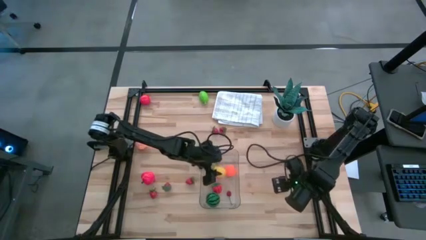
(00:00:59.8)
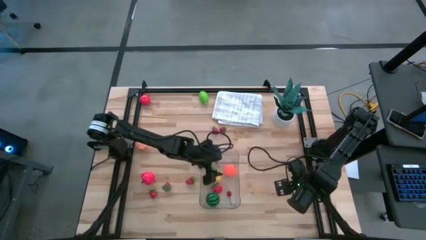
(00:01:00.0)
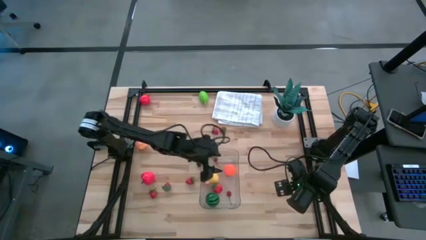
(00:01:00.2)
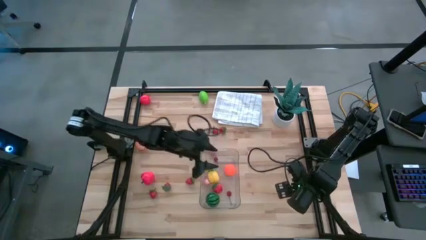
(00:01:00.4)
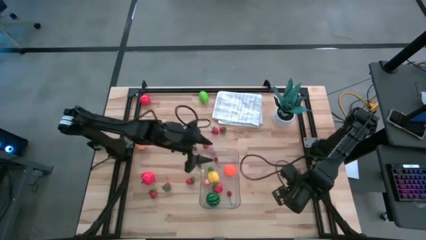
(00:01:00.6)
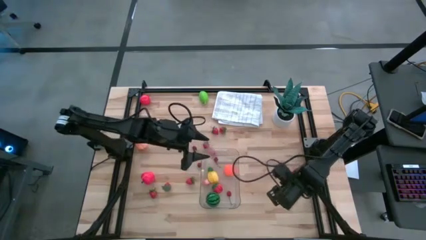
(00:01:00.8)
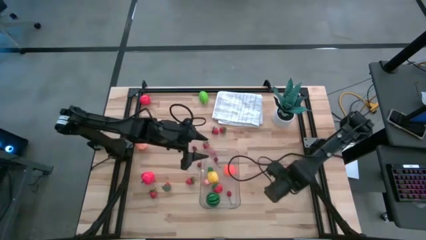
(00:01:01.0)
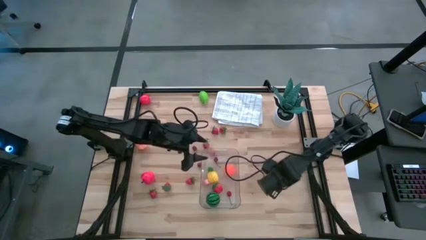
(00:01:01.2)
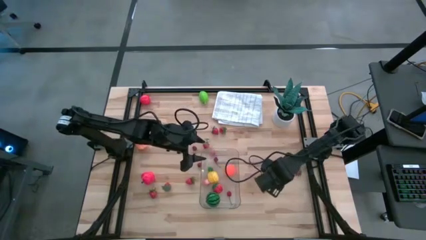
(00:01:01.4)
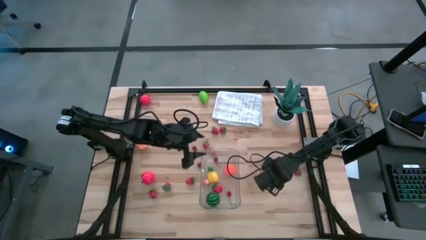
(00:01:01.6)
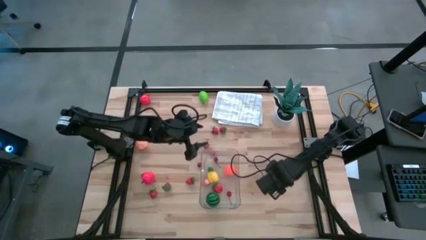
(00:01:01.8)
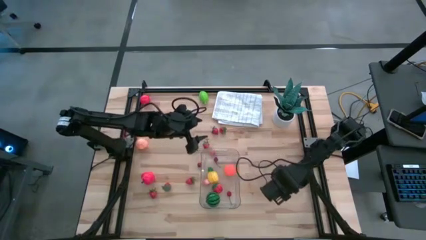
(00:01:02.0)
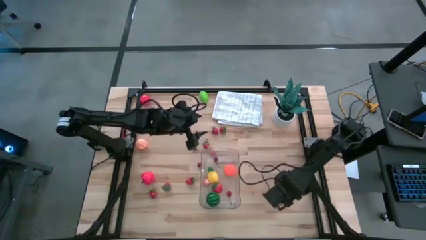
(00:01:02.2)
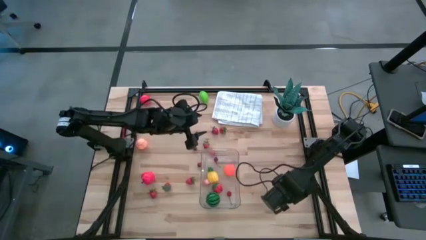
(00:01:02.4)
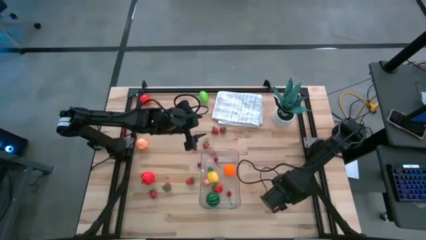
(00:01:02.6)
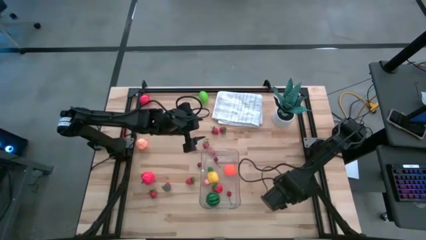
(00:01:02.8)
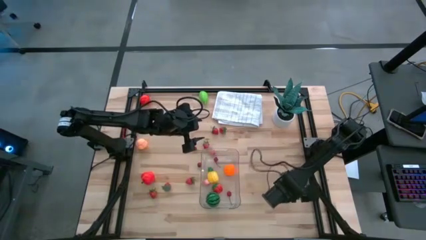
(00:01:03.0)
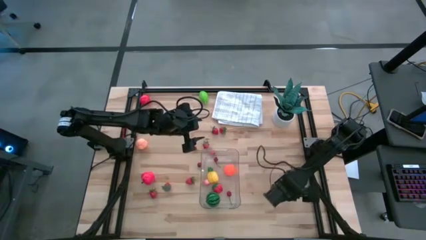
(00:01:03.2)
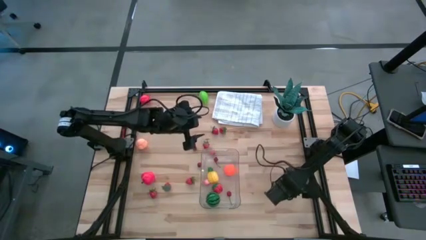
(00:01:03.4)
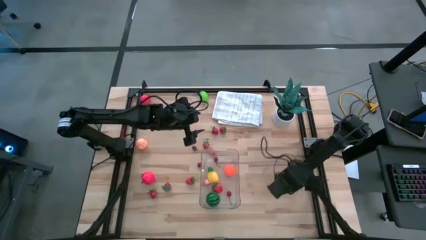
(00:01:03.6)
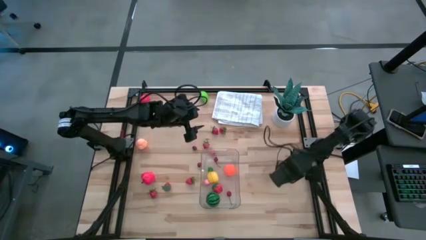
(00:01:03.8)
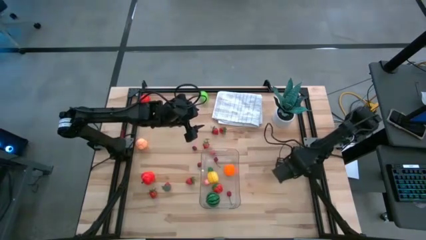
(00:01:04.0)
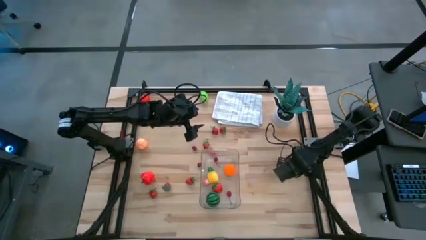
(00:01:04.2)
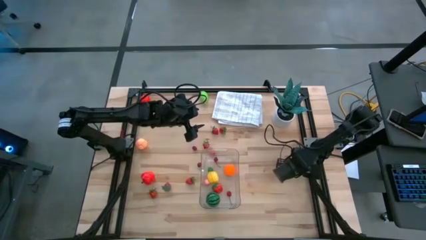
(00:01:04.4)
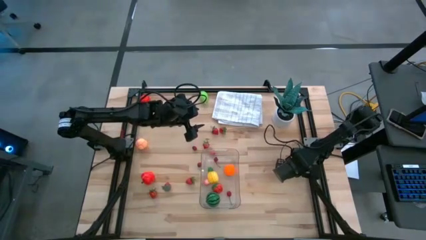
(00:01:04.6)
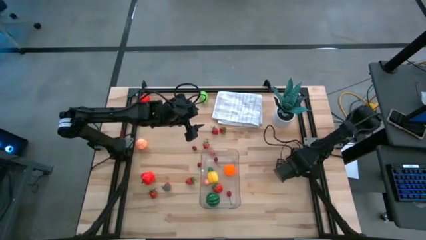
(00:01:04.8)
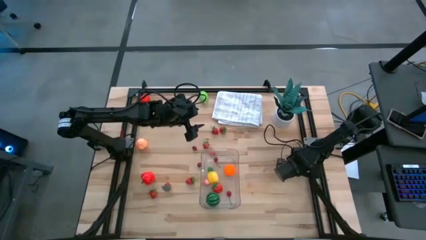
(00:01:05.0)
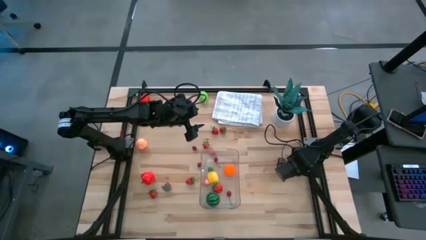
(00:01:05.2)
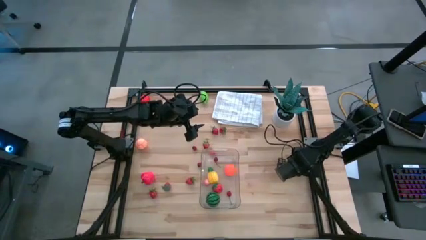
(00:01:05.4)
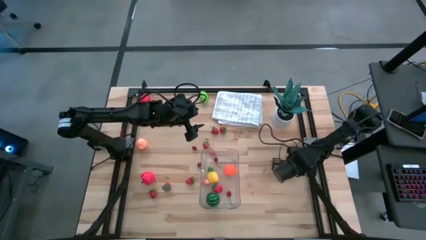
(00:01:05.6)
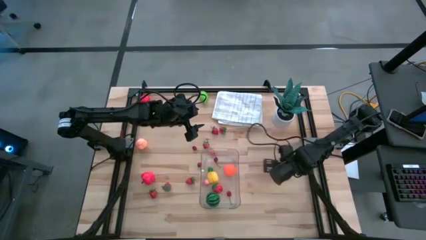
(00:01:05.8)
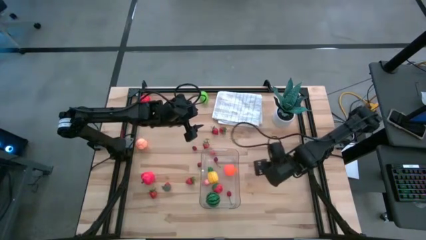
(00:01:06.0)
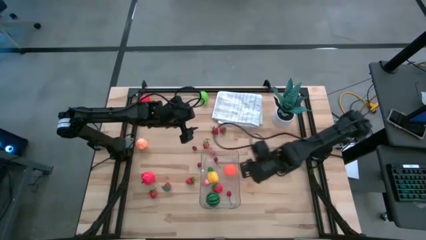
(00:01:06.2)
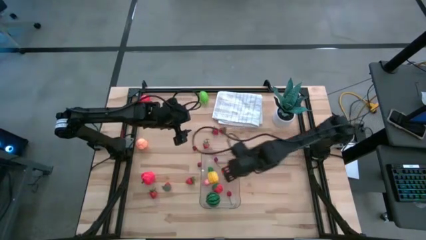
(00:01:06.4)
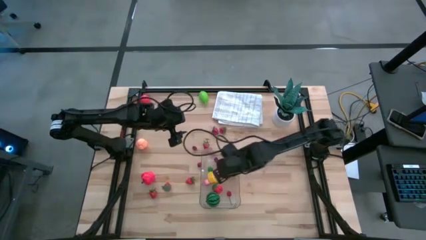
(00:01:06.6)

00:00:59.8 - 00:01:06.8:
Task: Pick and placing Produce into tupperware
Put the red strawberry into the transparent bin

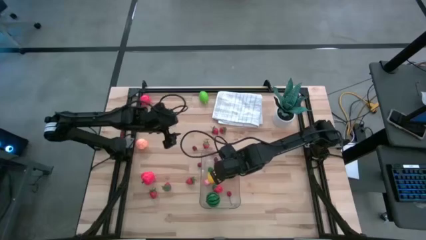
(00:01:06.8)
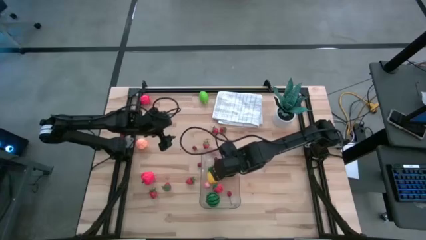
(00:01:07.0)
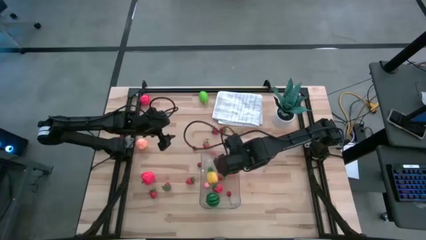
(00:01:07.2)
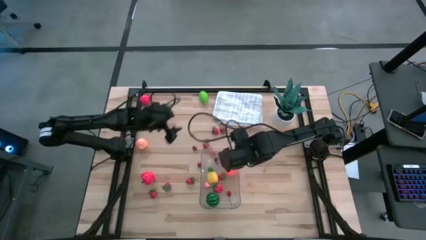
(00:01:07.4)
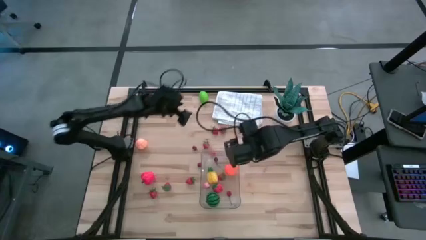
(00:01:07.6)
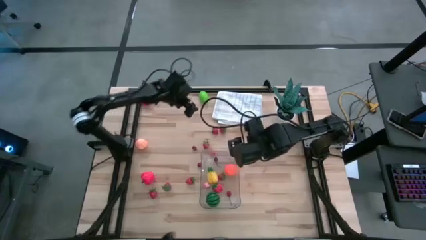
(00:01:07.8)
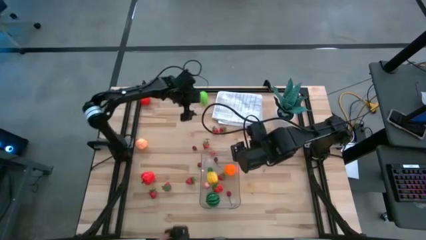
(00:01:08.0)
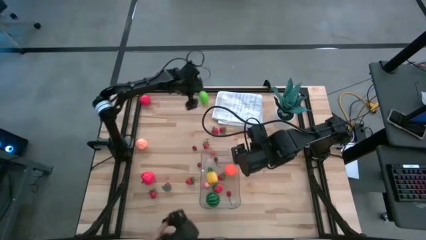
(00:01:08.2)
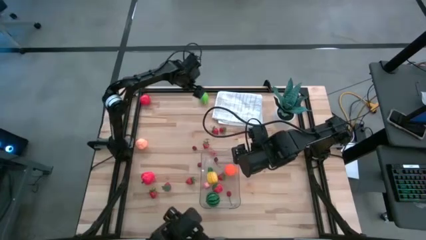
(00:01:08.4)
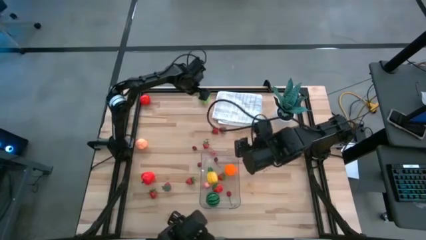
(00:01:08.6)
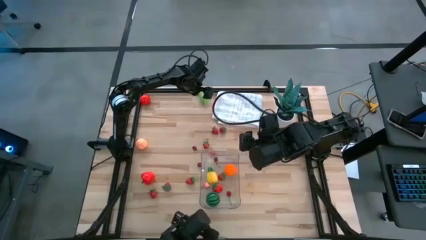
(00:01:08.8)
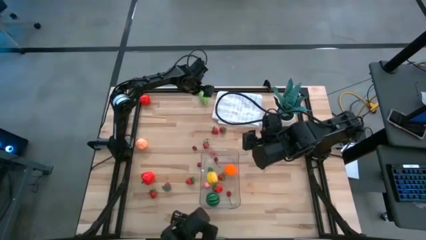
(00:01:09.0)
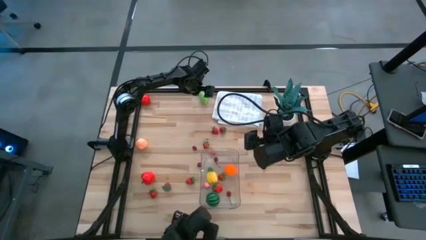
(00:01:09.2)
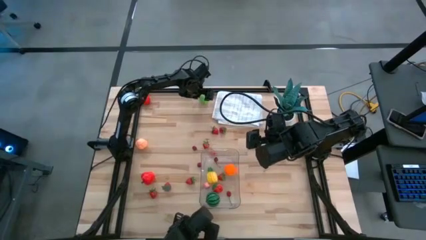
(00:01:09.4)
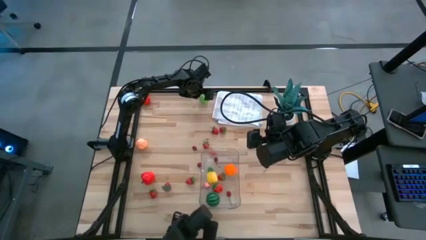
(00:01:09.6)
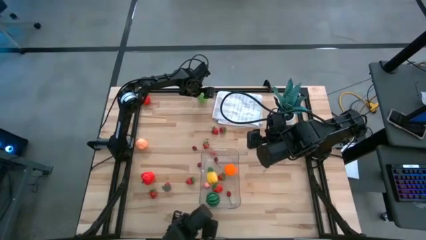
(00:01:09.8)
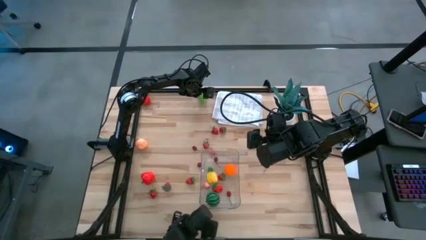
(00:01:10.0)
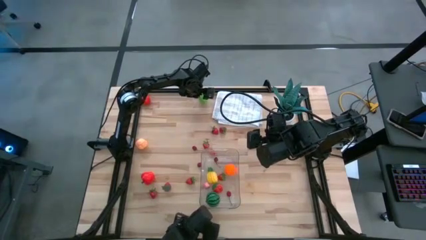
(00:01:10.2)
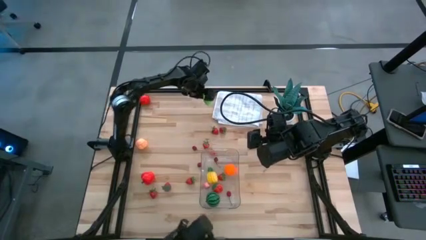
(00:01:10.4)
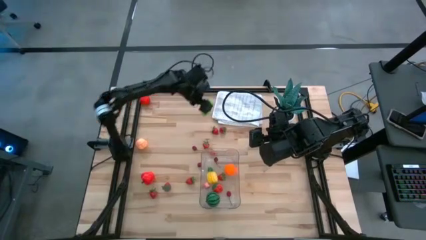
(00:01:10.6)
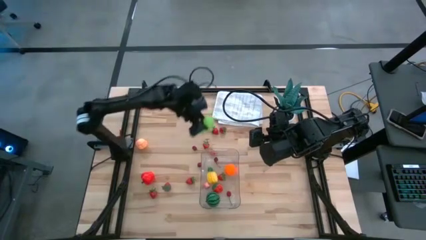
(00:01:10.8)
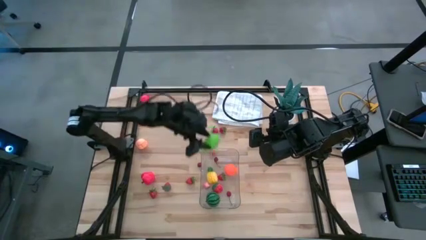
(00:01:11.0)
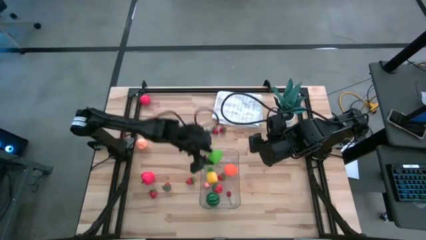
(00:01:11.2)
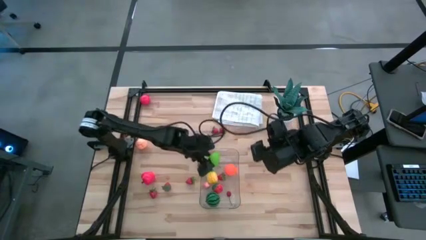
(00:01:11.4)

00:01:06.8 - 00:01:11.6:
Put the green honeydew melon into the transparent bin

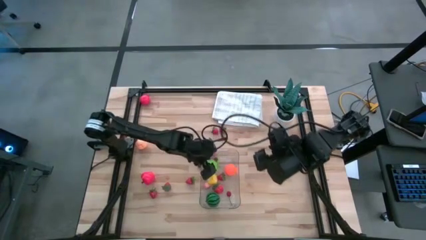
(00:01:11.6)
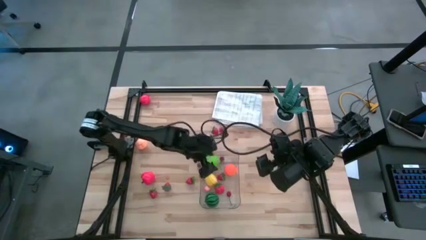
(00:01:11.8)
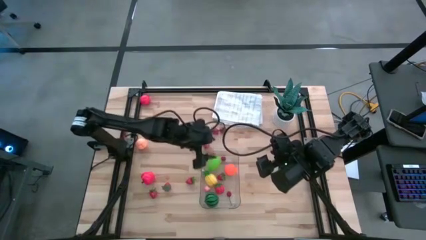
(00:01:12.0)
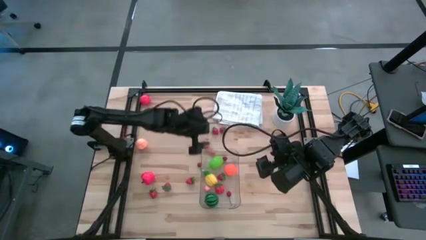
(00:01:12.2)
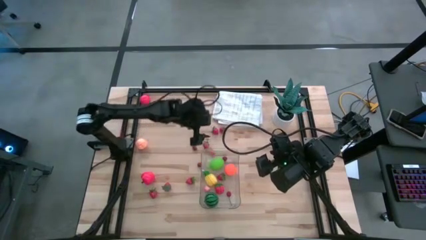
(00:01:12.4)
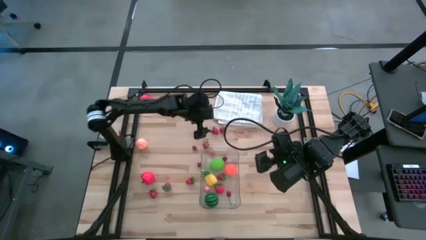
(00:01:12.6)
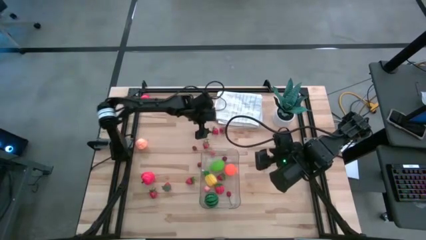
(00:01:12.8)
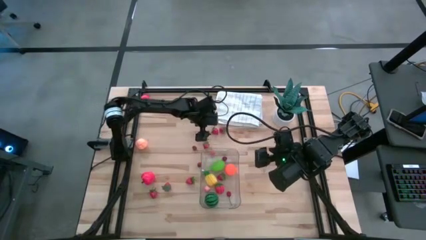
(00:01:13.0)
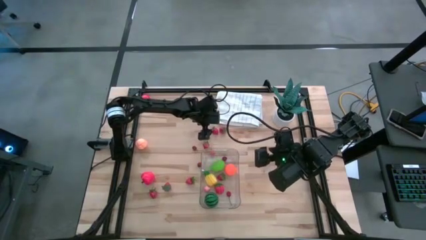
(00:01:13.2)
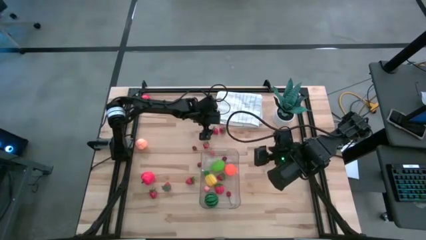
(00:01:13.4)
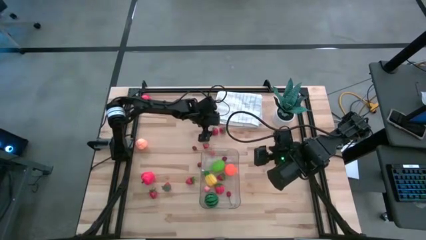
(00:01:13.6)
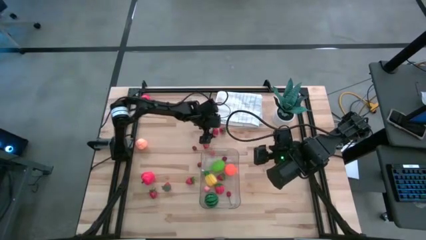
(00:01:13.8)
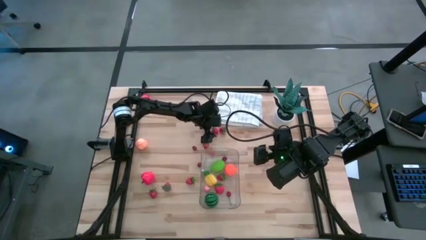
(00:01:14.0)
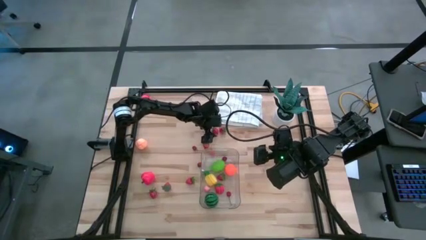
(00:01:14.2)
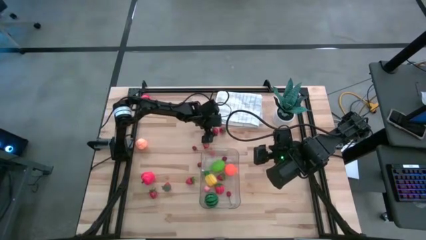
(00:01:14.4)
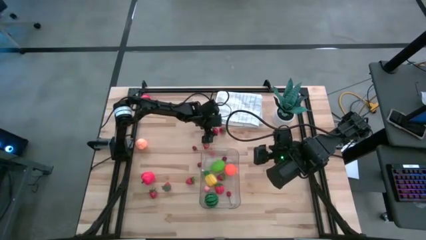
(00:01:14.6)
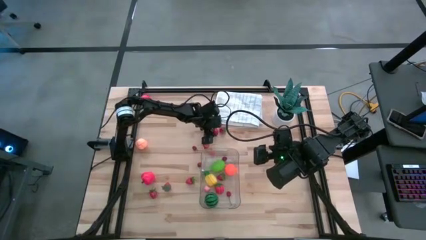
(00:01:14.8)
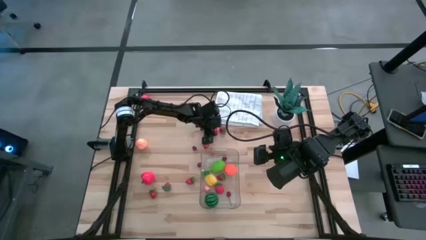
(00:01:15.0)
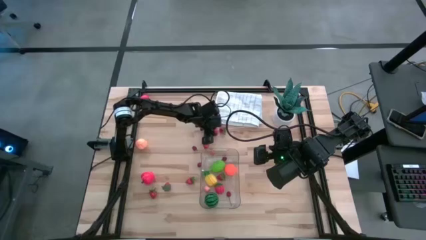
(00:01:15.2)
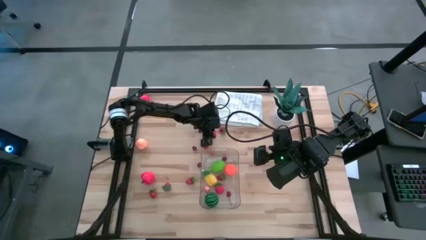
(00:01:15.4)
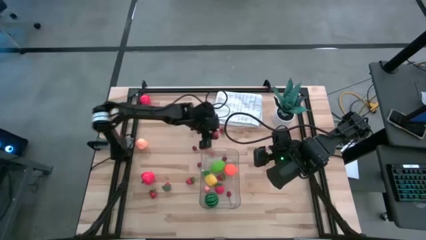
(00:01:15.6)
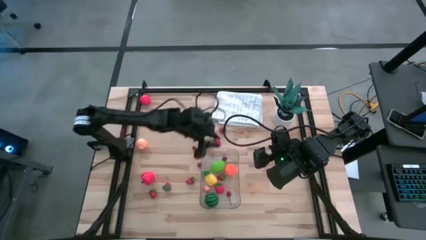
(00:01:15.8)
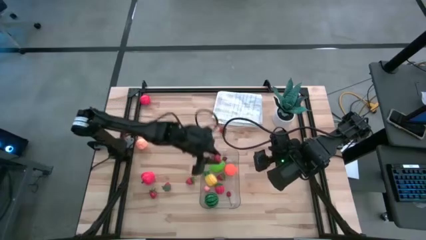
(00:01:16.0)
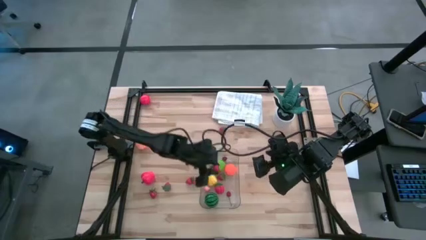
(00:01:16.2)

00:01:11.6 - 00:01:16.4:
Put the red strawberry into the transparent bin
